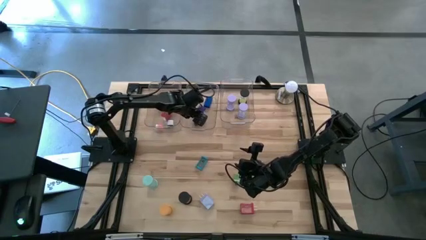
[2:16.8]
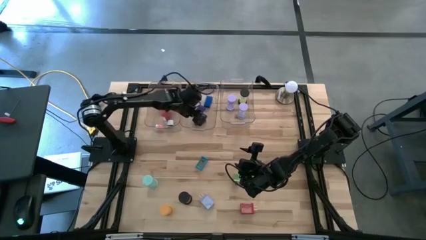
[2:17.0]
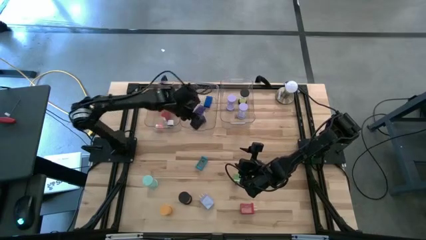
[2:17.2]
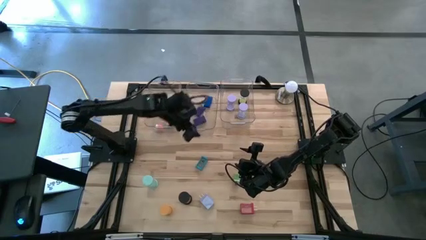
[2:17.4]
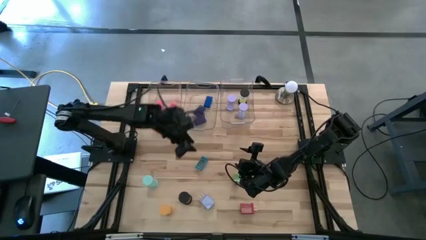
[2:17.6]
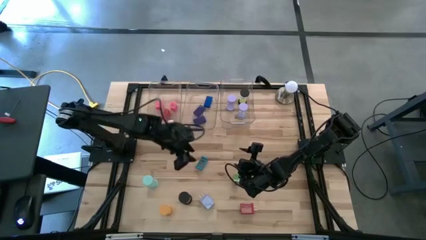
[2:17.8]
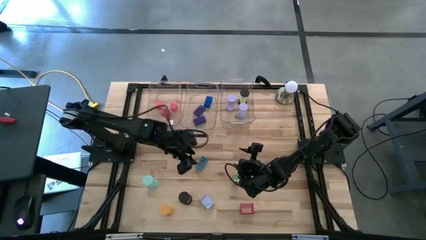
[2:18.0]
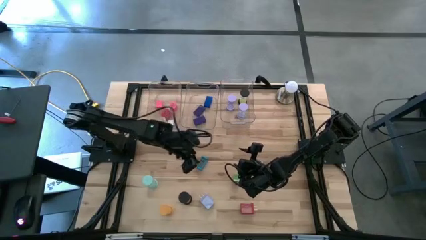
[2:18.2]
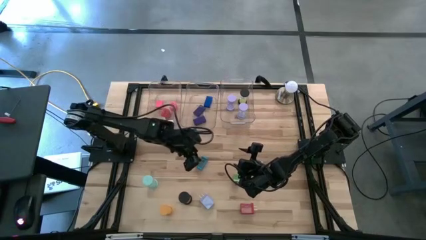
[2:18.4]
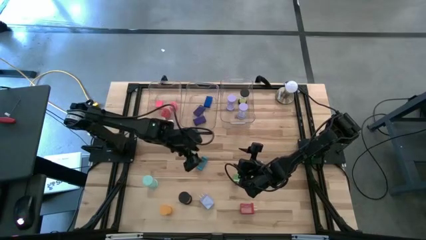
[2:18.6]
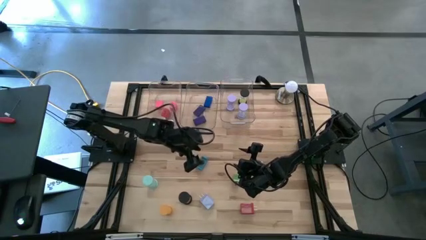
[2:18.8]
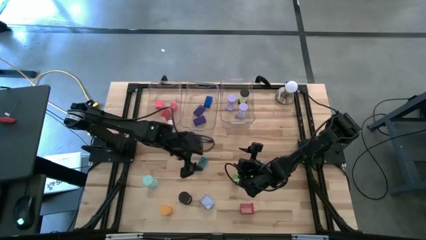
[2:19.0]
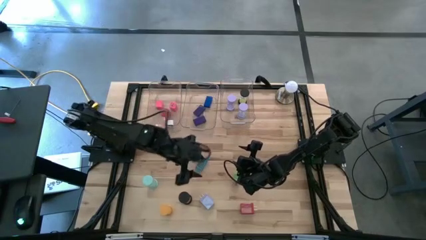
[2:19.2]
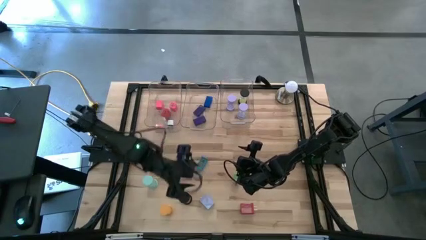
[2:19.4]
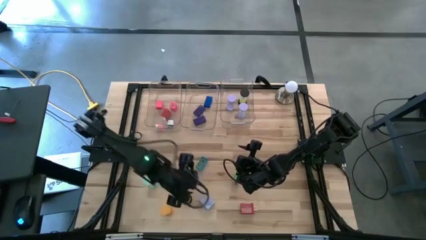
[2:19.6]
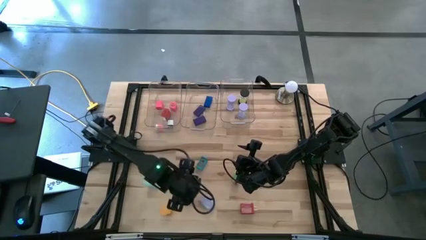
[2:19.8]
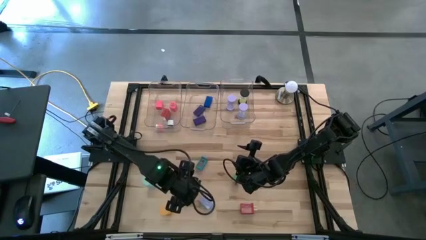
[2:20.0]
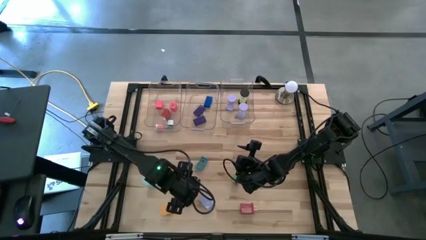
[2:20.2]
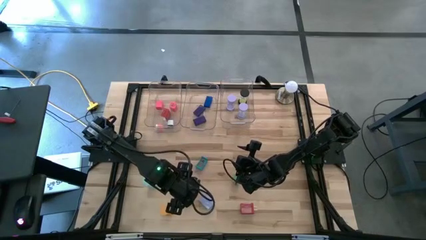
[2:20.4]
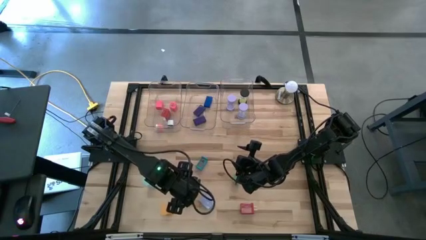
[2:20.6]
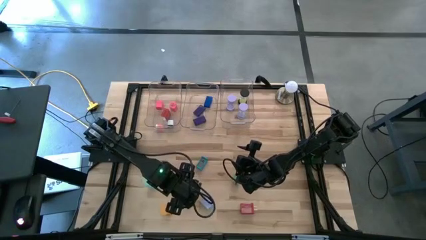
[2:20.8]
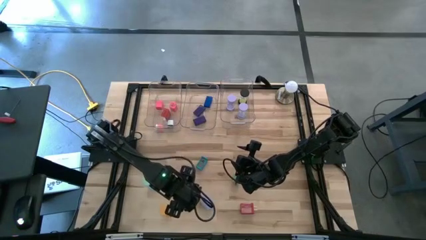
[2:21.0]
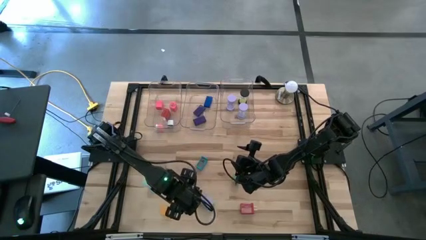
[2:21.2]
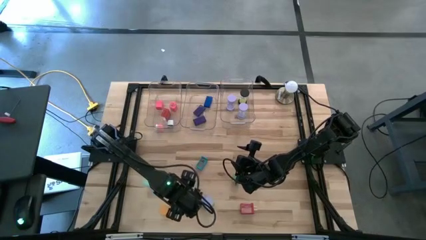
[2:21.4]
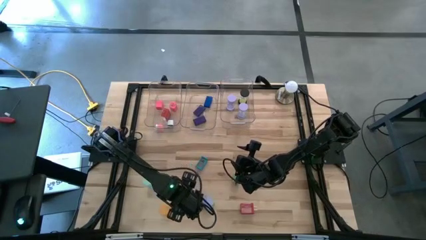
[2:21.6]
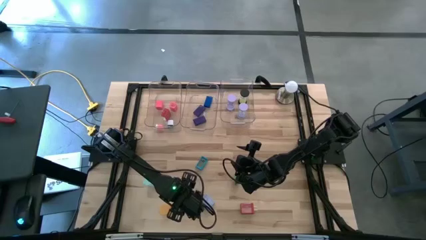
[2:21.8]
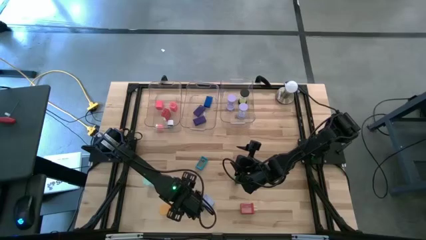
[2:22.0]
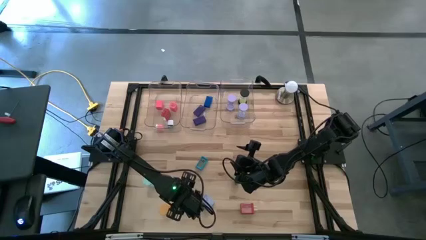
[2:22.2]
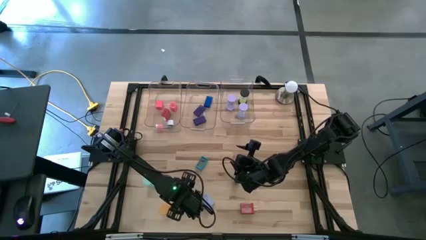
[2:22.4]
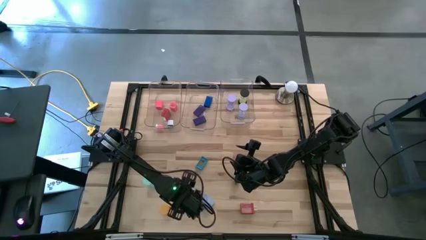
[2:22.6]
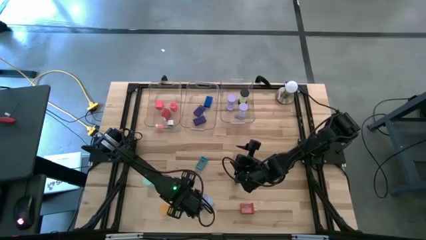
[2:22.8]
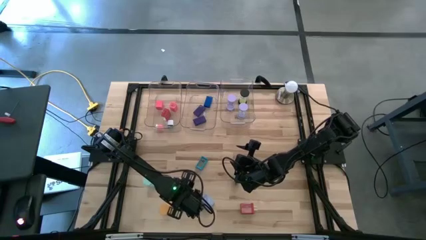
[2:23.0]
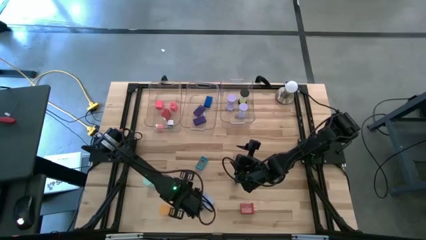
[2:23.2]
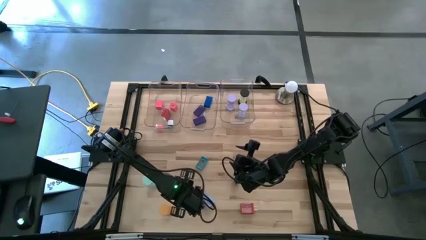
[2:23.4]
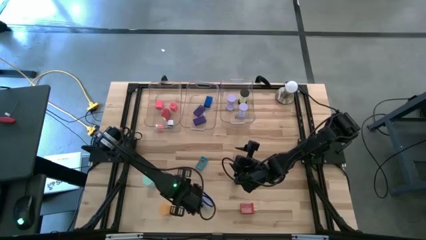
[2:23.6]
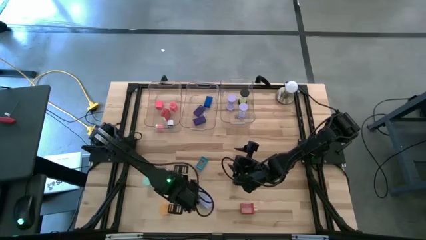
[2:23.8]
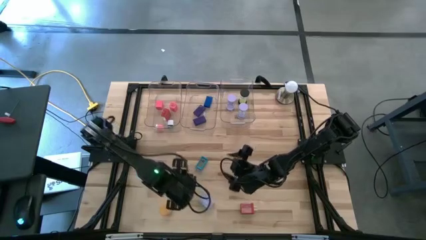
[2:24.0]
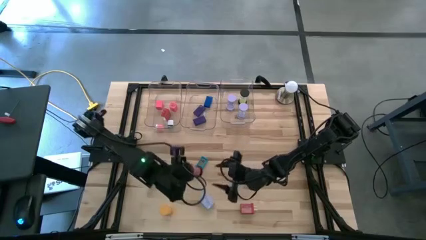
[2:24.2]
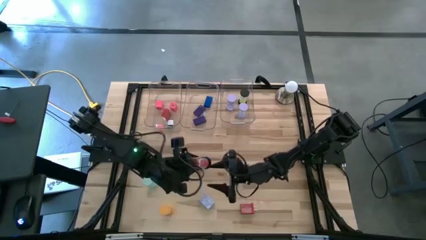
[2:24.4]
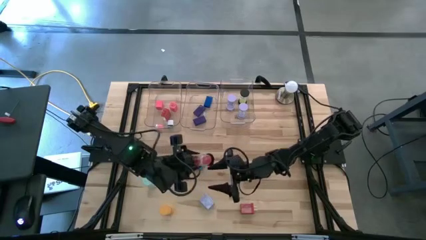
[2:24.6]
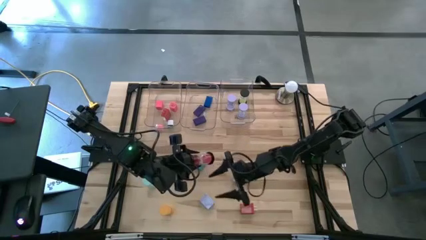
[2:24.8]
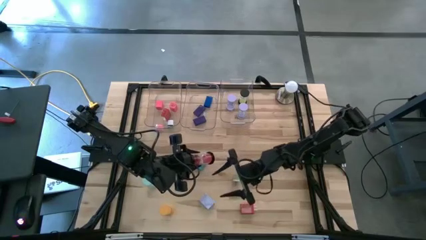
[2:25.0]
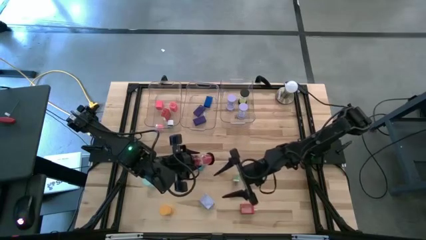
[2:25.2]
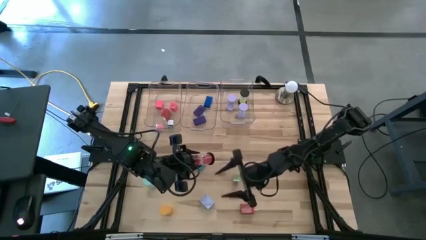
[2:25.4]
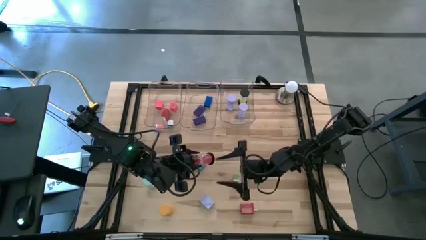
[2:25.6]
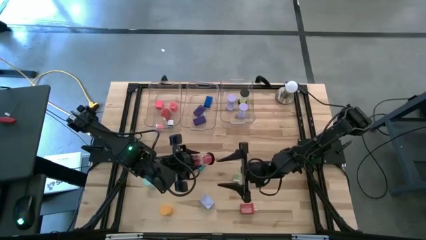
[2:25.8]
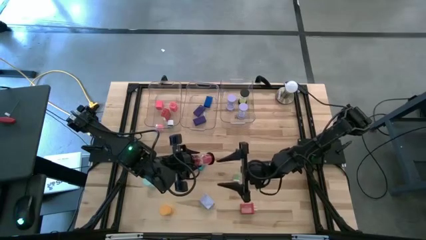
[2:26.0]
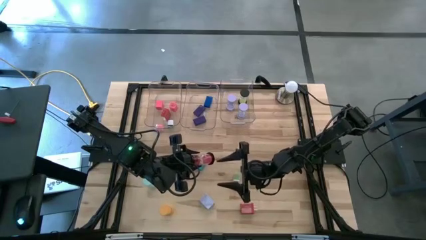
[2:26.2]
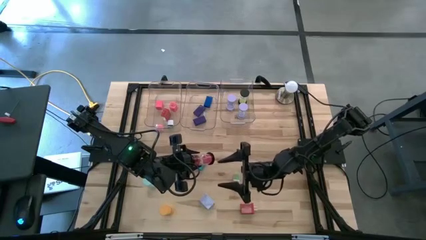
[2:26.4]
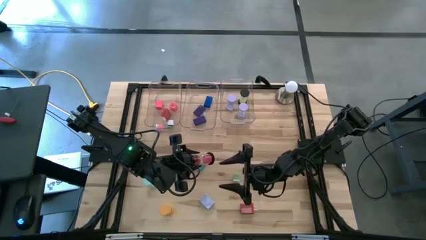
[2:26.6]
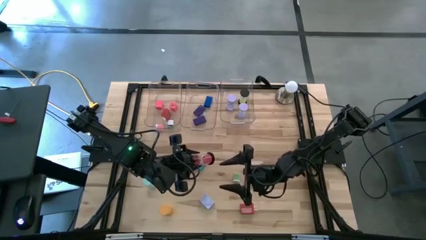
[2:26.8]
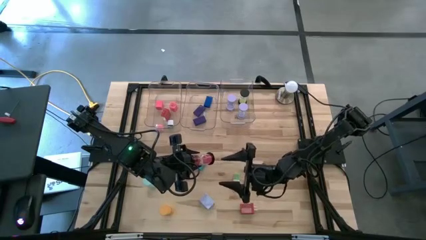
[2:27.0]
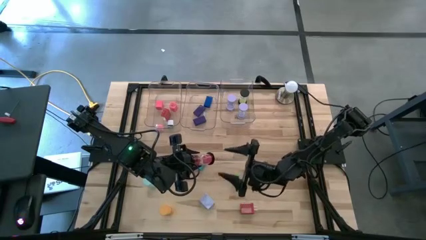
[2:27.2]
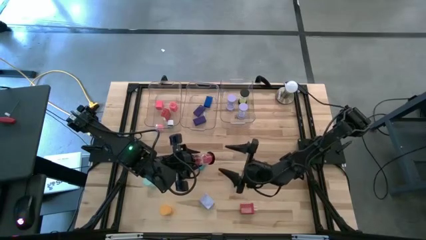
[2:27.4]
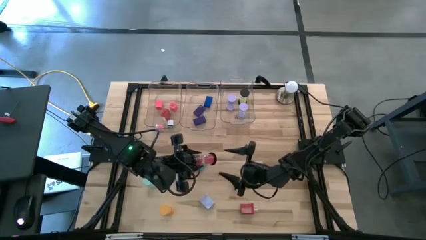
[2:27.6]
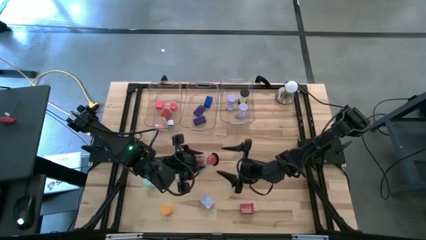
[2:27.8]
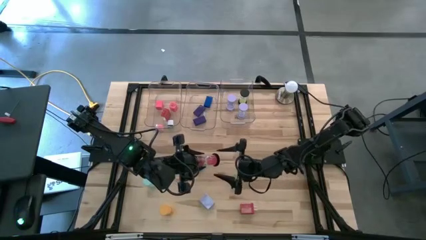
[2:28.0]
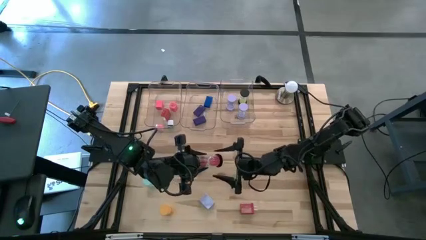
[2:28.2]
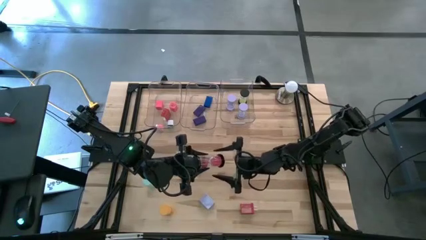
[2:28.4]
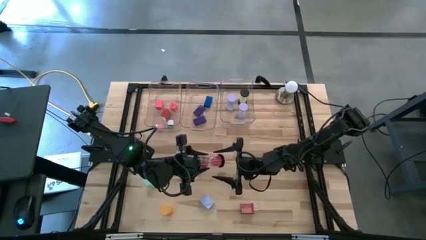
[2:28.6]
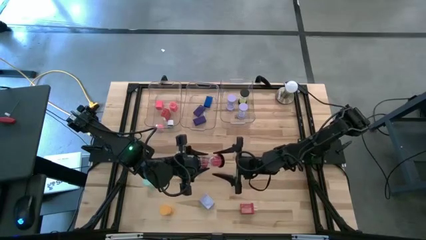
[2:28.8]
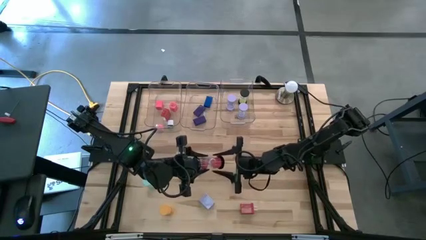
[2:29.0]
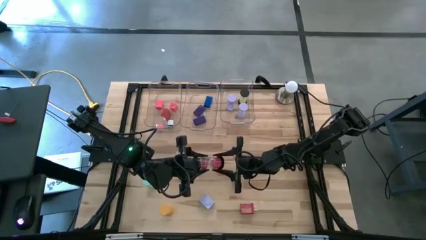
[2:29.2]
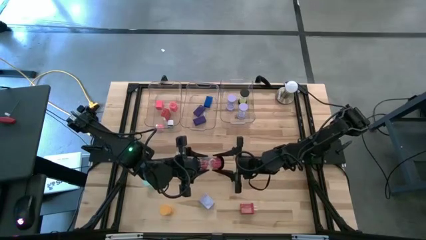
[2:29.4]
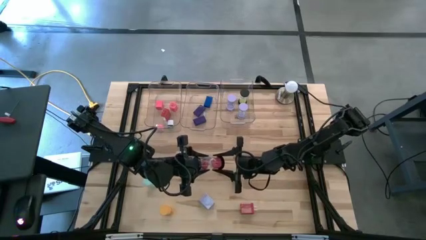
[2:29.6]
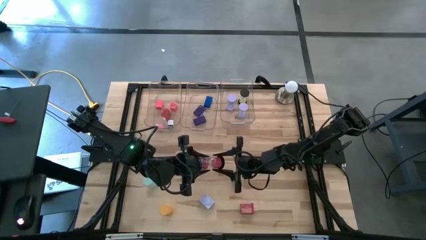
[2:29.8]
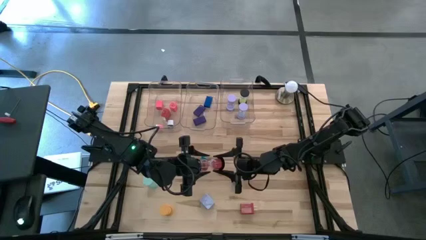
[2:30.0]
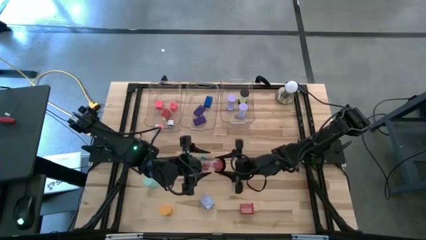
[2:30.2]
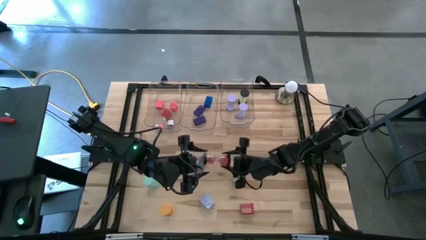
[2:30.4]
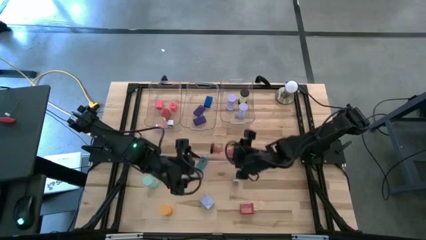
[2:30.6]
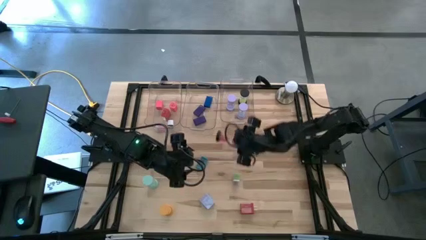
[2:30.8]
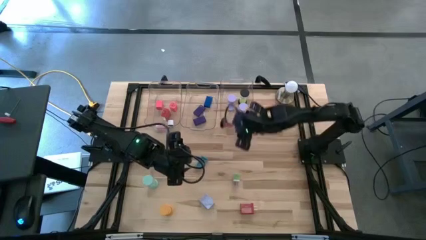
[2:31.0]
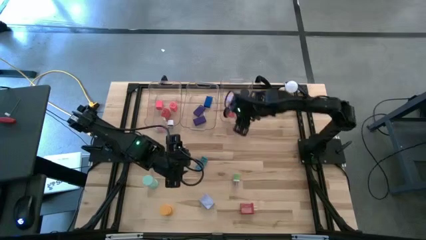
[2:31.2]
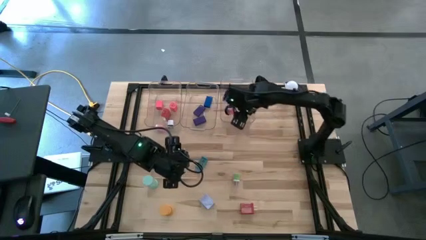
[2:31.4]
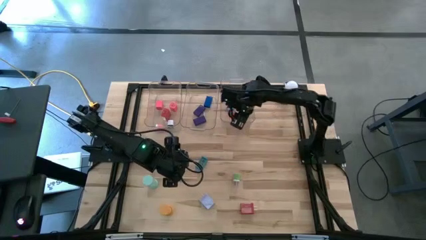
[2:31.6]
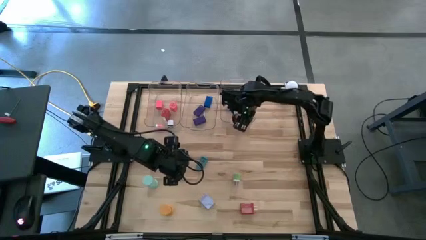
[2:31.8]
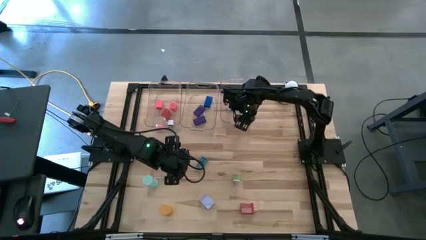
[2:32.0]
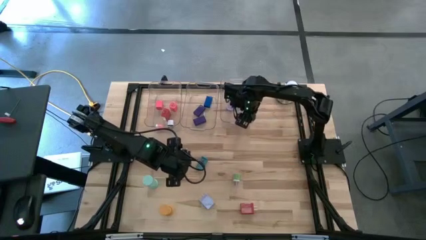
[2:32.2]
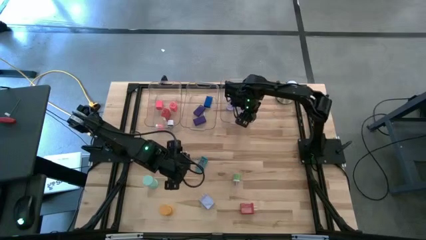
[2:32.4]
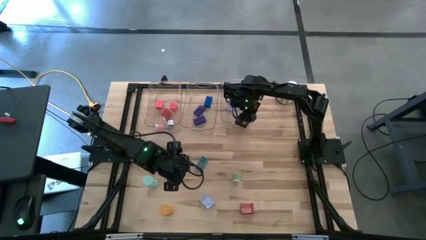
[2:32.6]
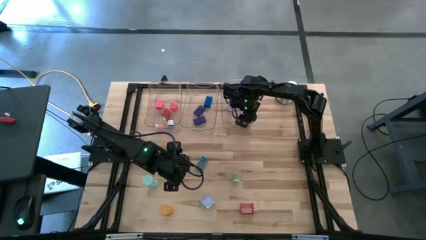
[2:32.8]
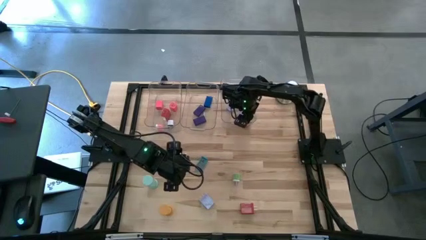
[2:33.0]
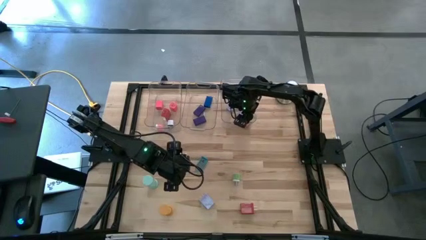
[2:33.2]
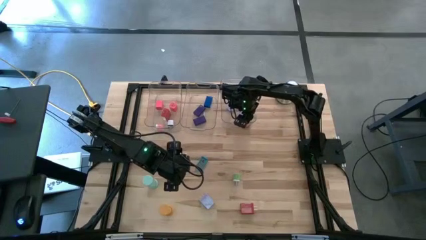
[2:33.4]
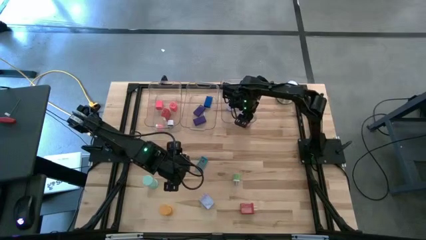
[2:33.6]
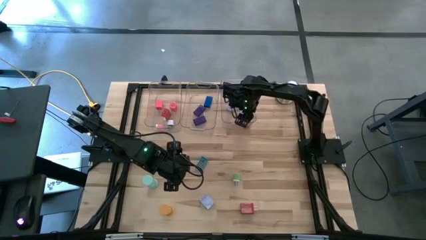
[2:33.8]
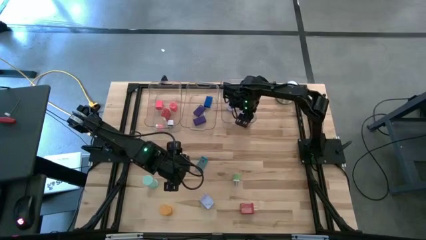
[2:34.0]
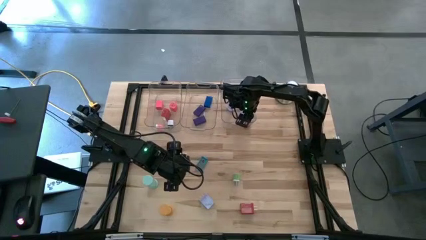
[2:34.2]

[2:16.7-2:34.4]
Task: Pick & Place Office items
Put the red hourglass into the right transparent bin
